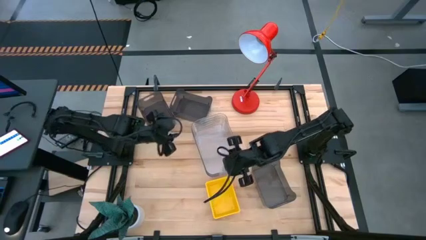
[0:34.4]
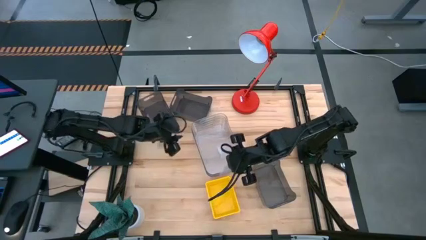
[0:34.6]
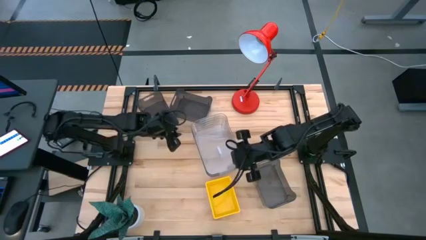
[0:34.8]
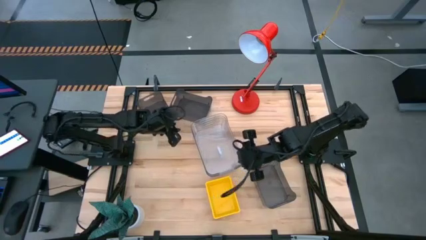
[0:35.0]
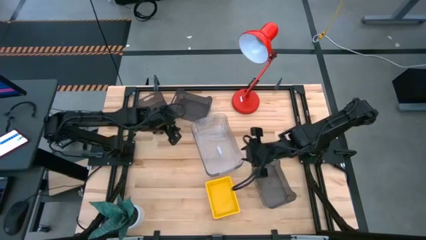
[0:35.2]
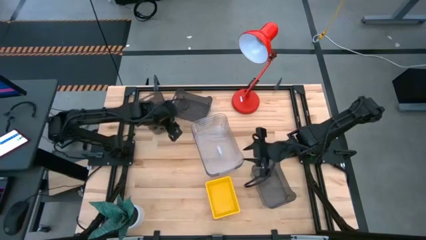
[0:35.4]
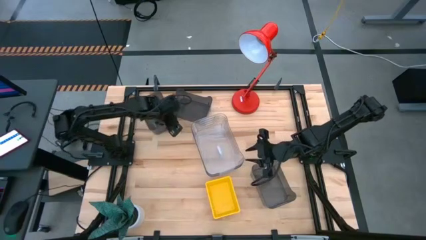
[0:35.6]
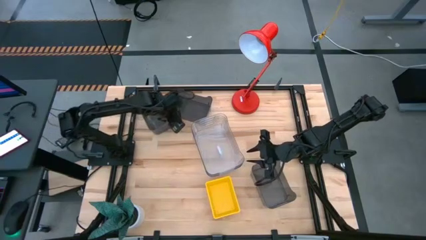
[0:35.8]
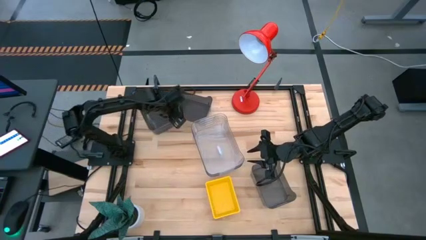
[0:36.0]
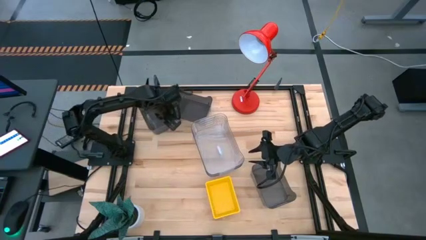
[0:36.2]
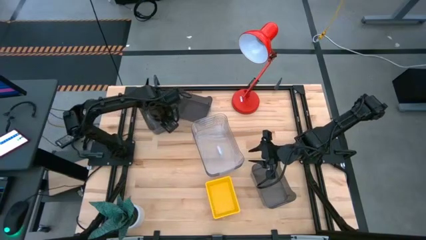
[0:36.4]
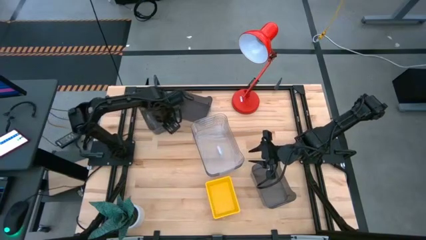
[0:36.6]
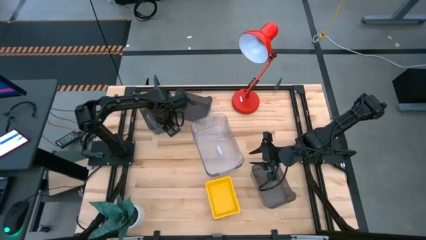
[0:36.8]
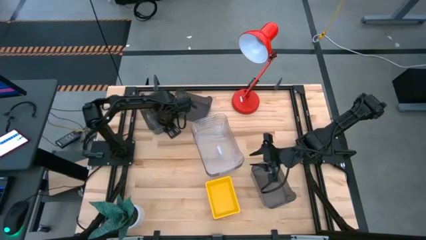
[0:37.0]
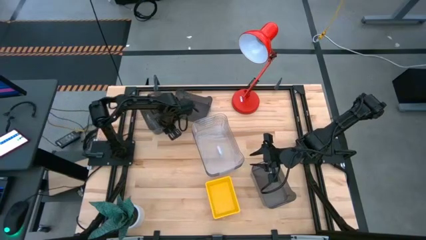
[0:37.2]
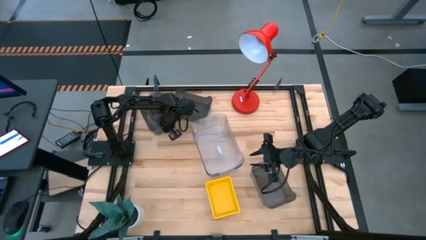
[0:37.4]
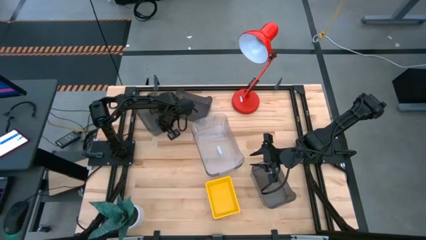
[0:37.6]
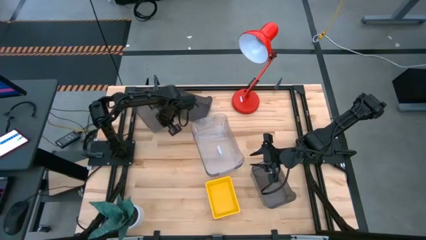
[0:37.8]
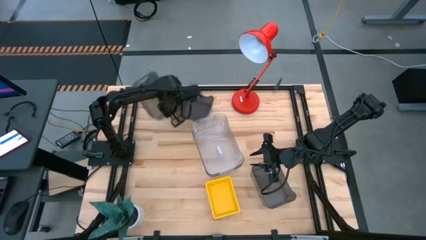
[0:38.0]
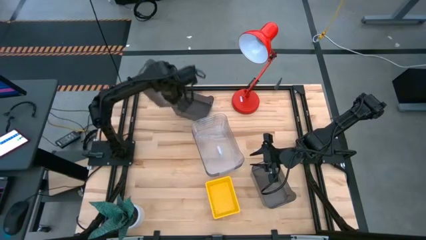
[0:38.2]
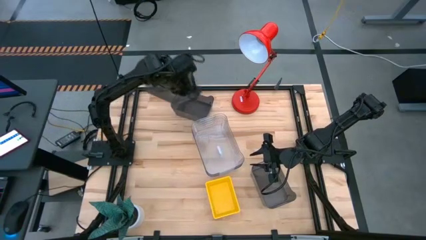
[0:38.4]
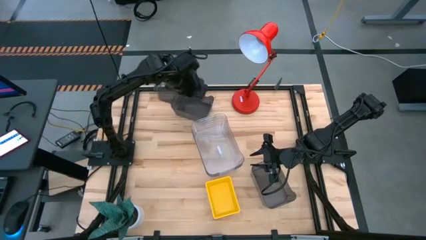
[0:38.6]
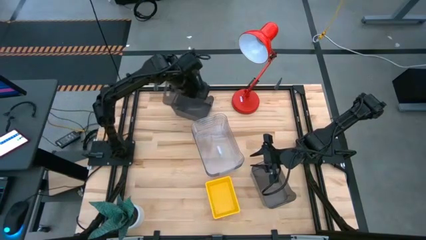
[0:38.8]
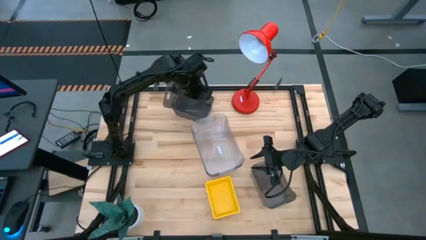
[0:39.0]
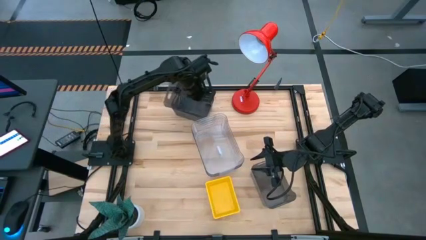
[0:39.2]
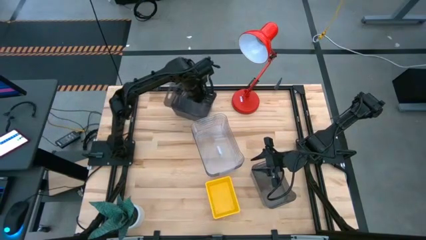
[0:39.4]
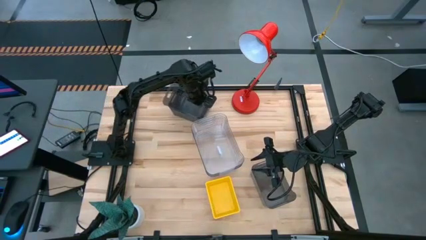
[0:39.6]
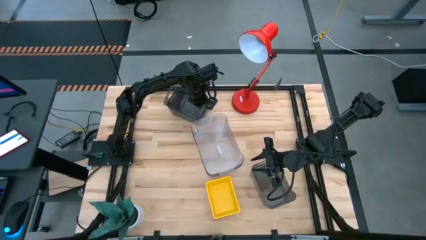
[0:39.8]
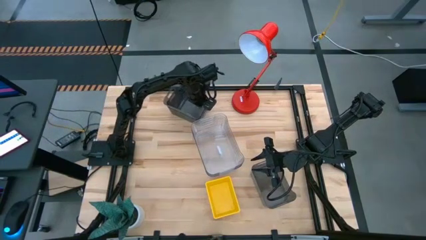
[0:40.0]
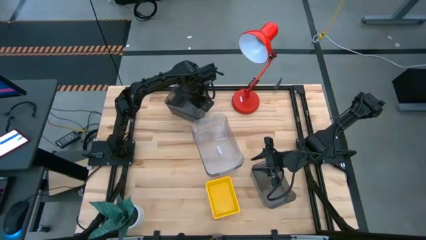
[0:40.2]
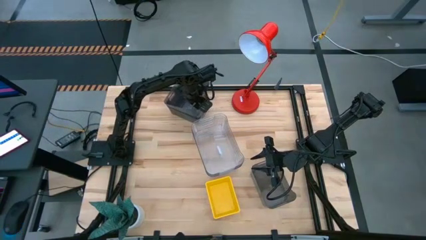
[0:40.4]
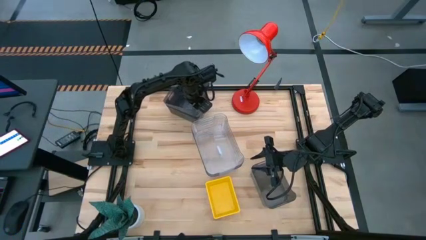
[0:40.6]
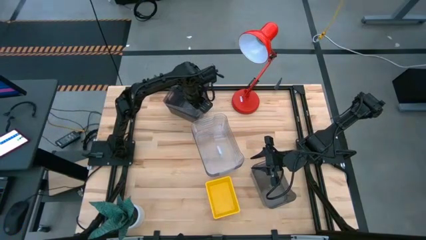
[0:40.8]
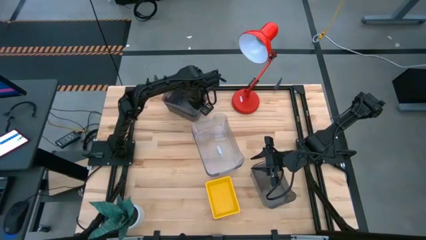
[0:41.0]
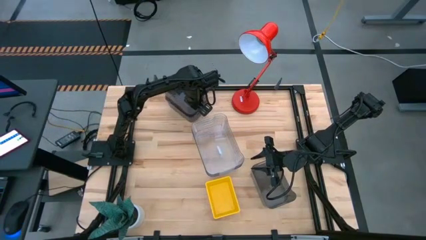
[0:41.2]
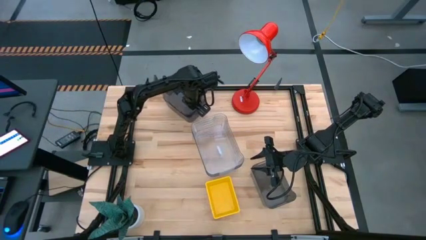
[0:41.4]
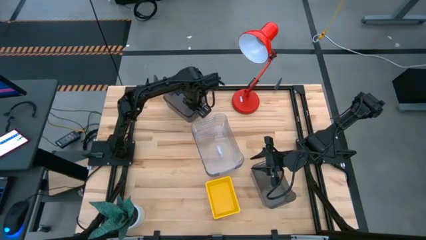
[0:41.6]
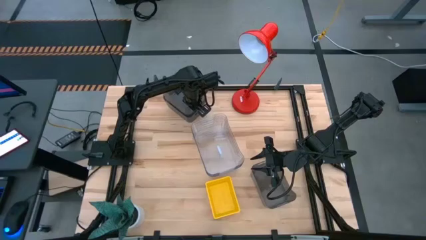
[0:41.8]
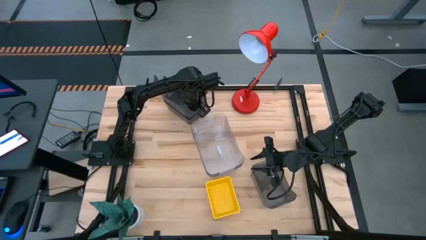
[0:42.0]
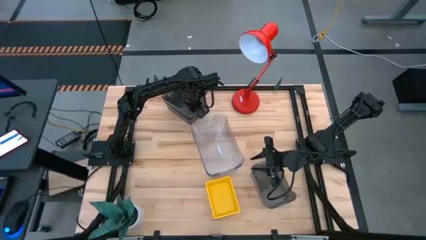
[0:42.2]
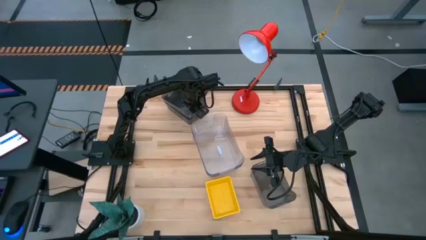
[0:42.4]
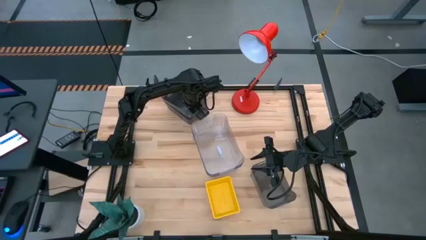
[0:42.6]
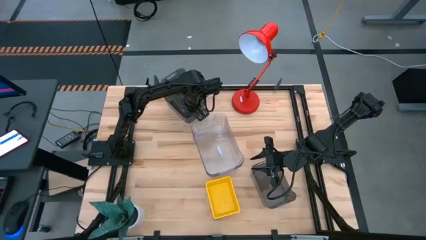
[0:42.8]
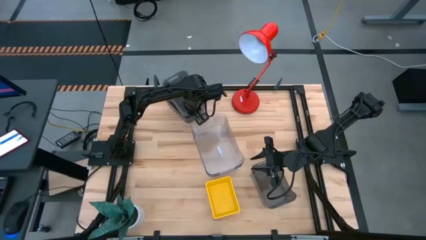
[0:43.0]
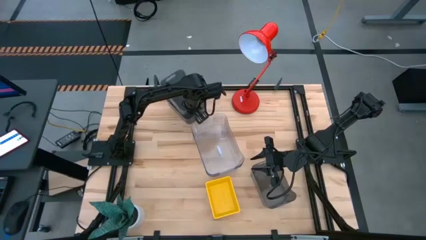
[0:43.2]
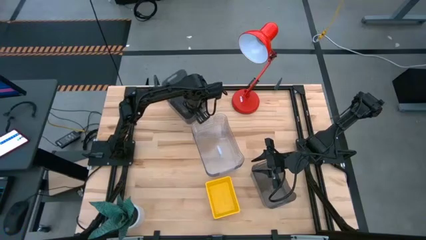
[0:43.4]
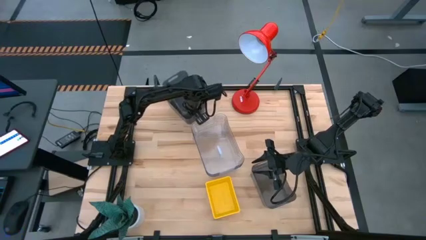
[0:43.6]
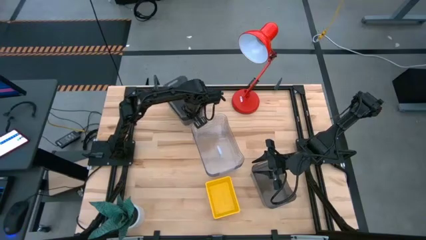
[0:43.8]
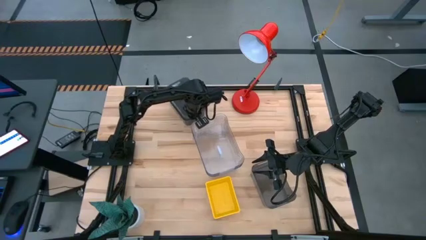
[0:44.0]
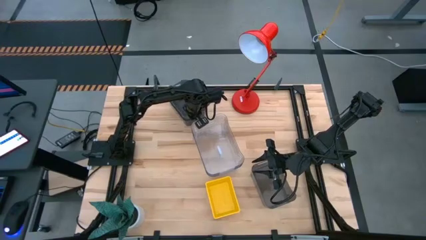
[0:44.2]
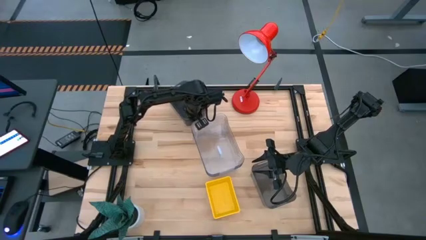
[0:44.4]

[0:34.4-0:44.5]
Stack the top left black bin on the top black bin

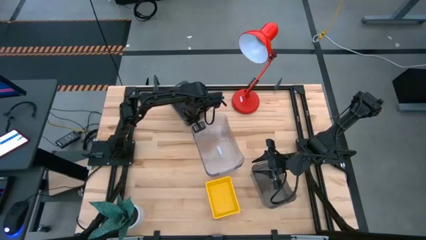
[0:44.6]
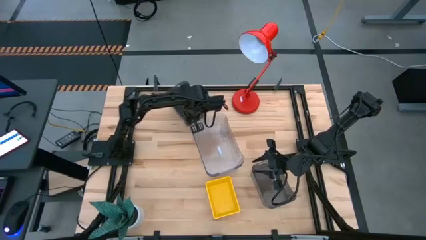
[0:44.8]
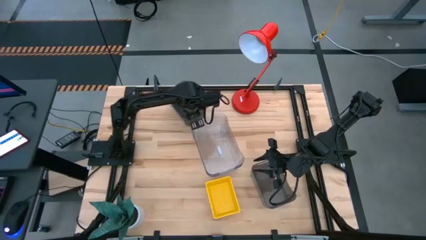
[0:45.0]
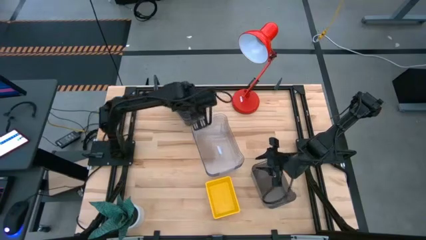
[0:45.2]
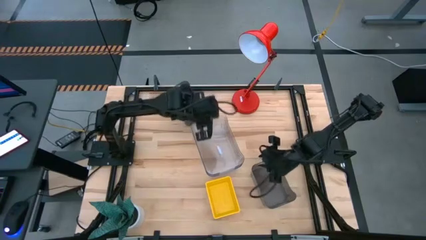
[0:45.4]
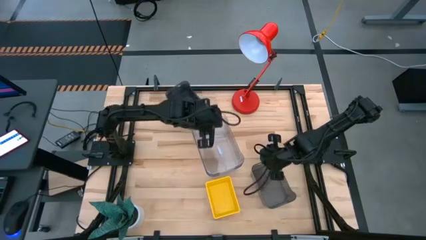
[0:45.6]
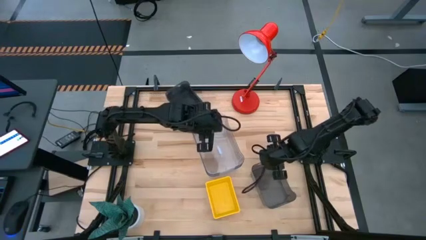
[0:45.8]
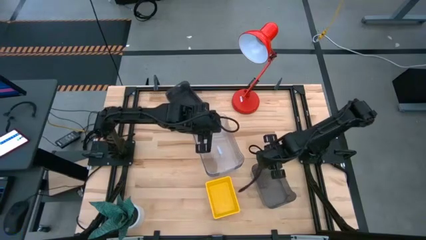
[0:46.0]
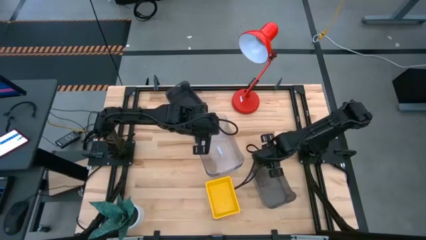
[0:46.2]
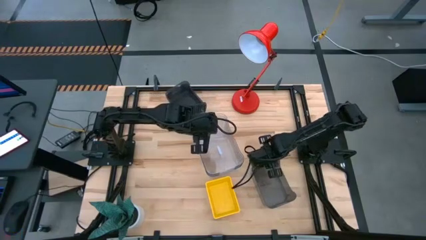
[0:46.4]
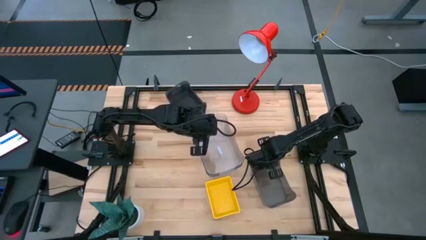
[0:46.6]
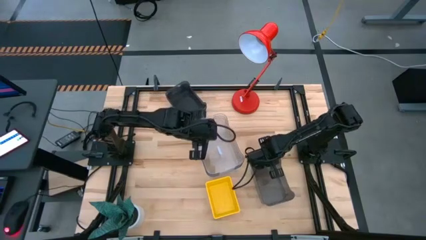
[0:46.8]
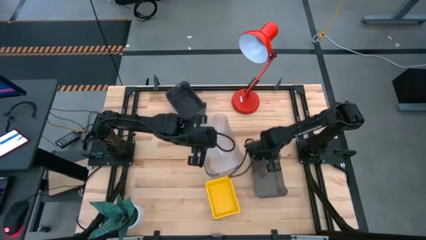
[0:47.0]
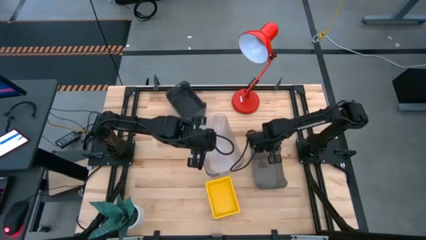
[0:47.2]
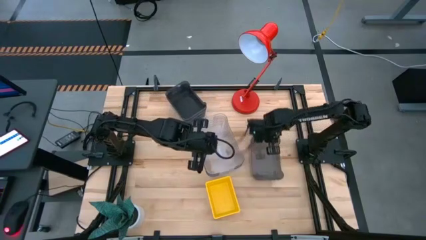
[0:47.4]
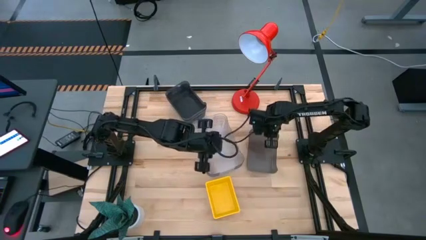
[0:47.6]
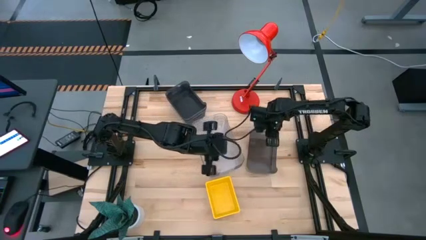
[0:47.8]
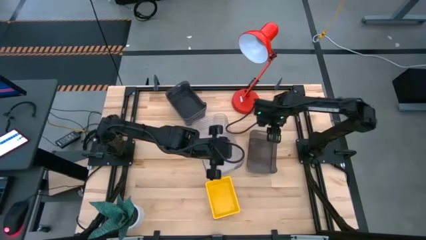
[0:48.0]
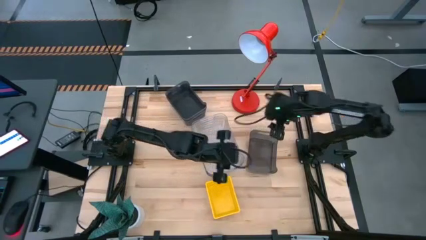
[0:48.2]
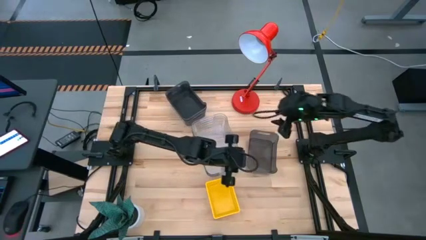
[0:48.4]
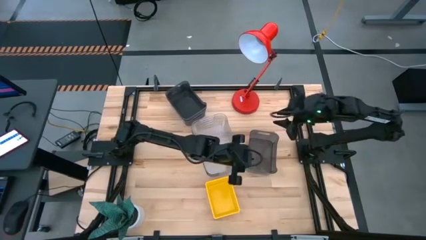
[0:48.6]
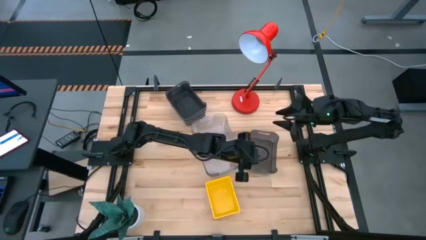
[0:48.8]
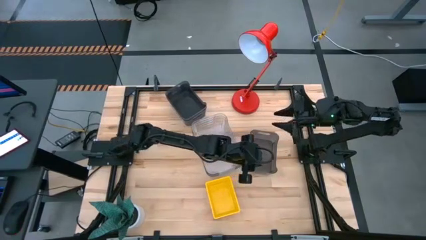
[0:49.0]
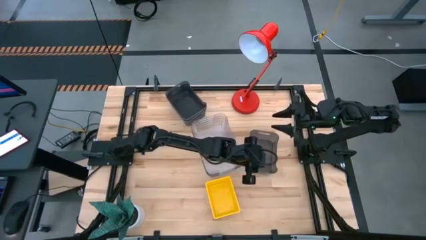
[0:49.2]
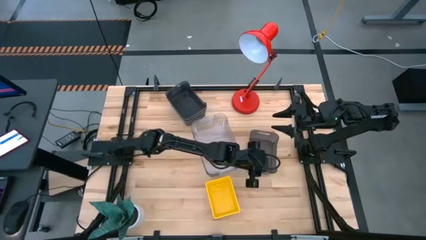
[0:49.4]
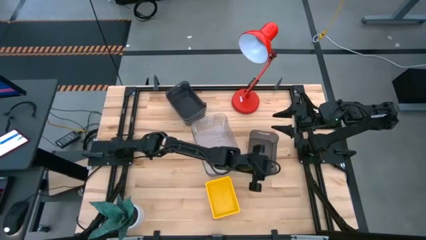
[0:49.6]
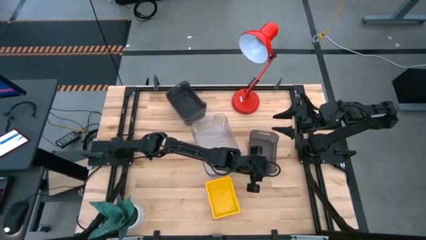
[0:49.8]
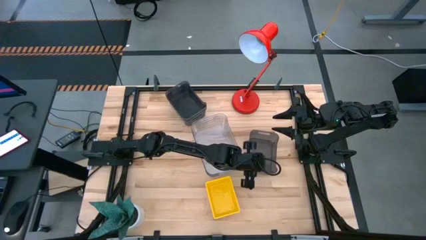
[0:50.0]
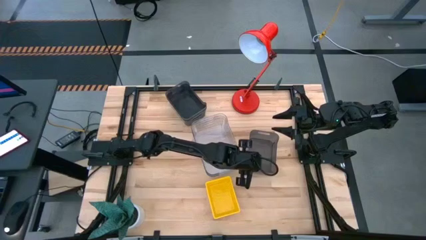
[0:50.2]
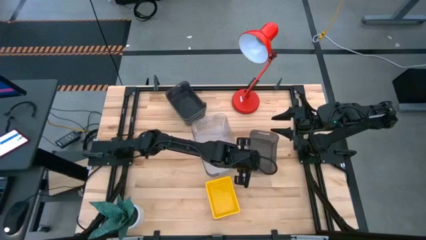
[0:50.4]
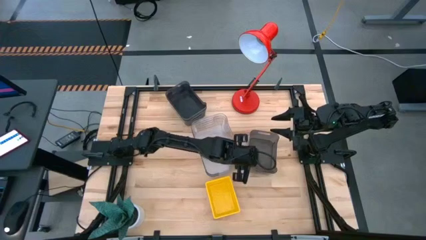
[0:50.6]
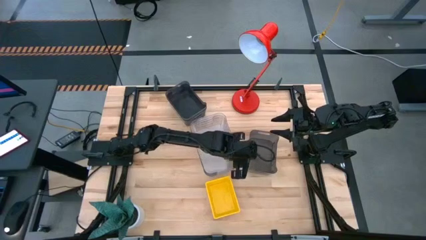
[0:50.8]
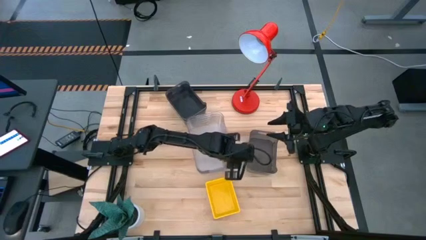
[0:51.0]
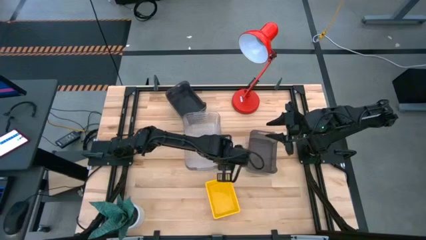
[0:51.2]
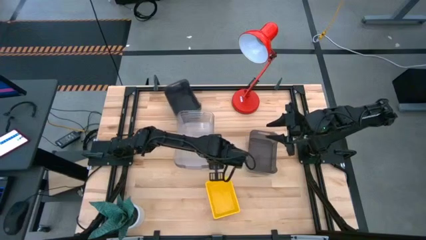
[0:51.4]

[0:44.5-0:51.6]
Adjust the stacked transparent bin
